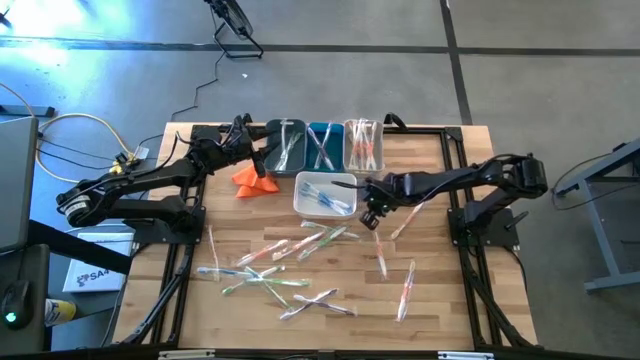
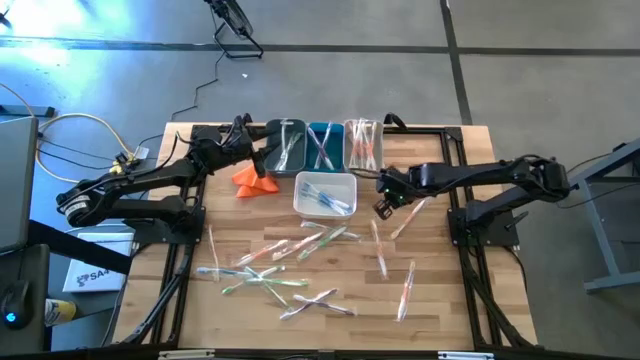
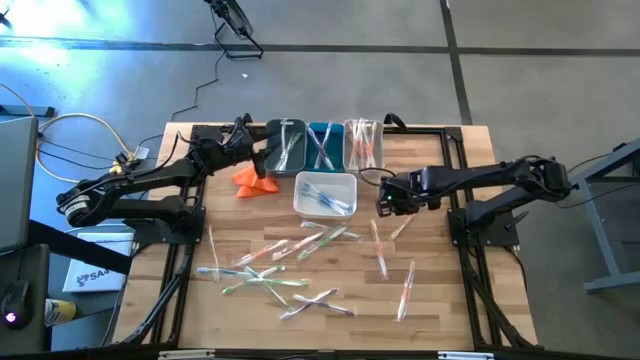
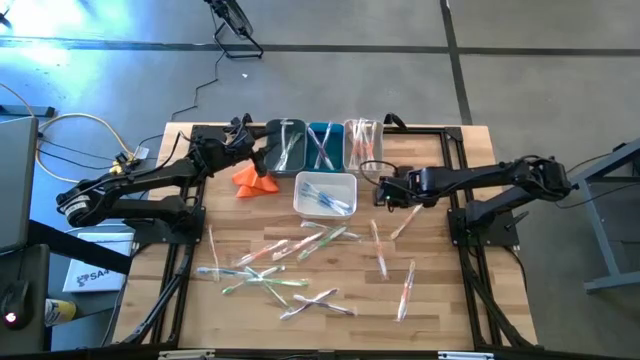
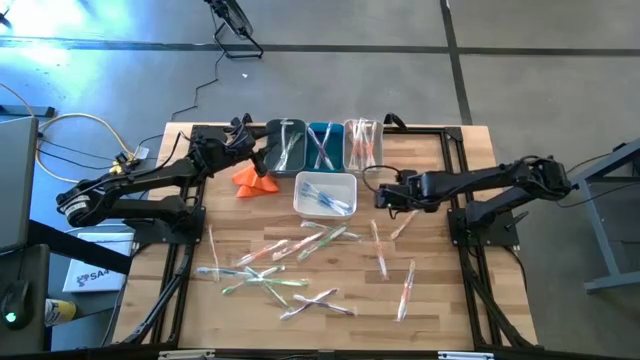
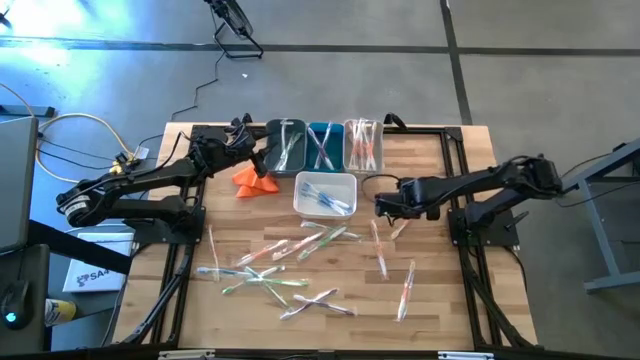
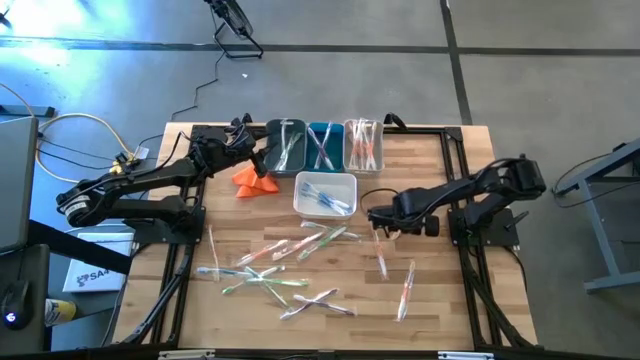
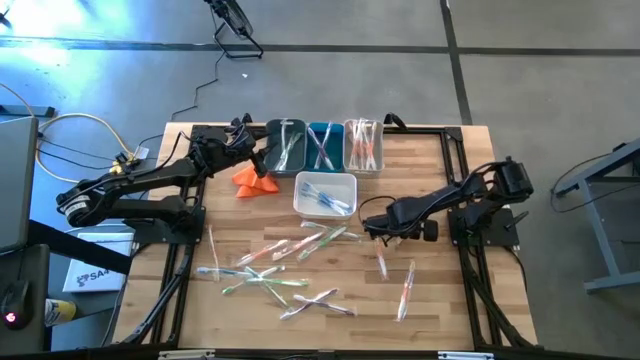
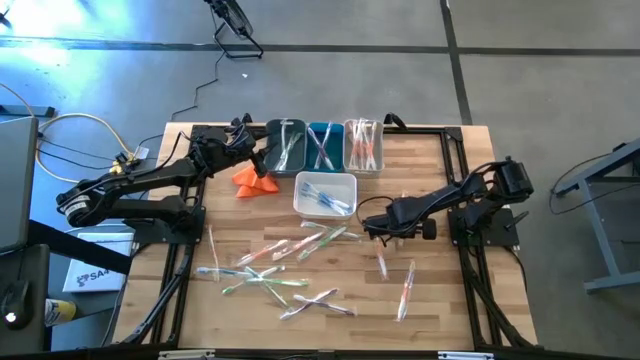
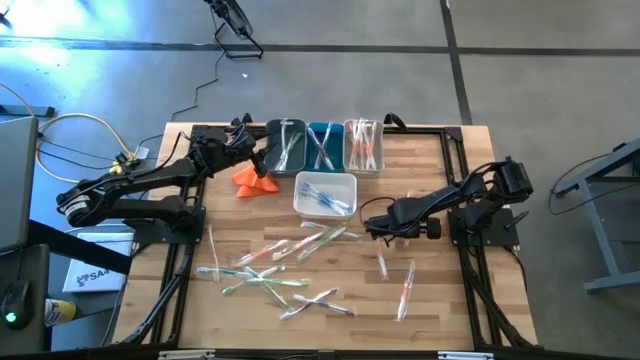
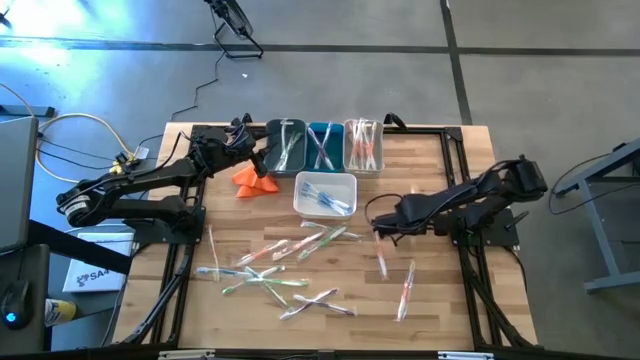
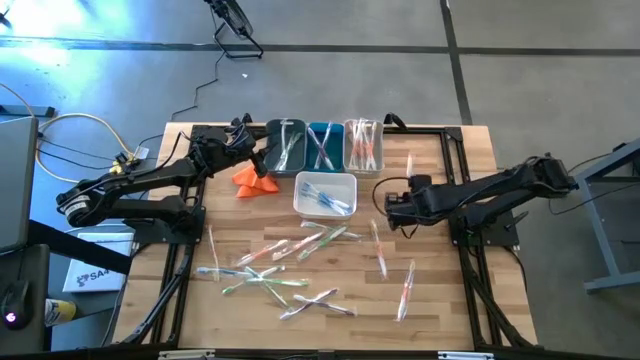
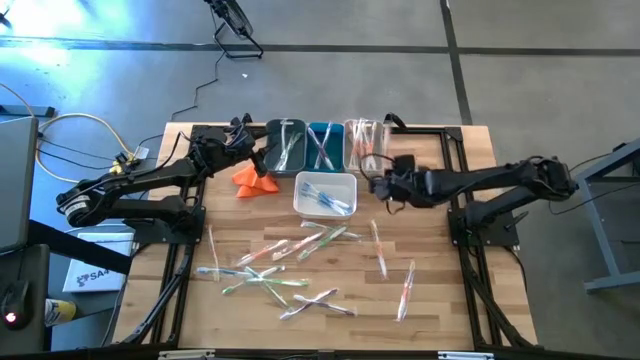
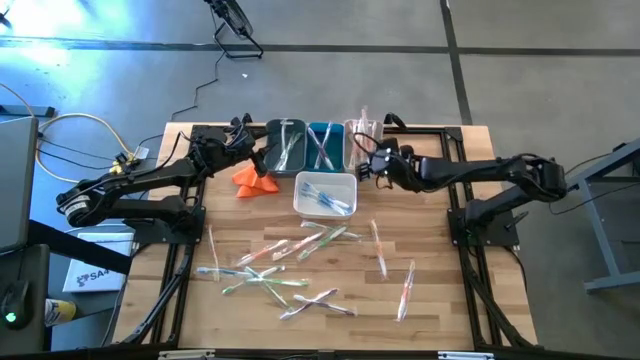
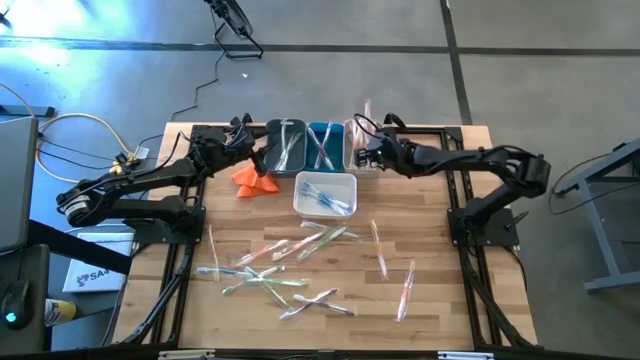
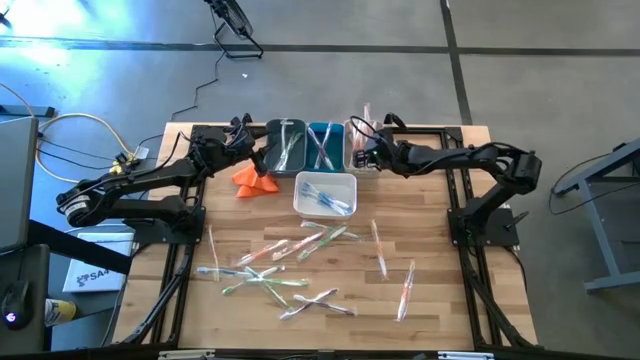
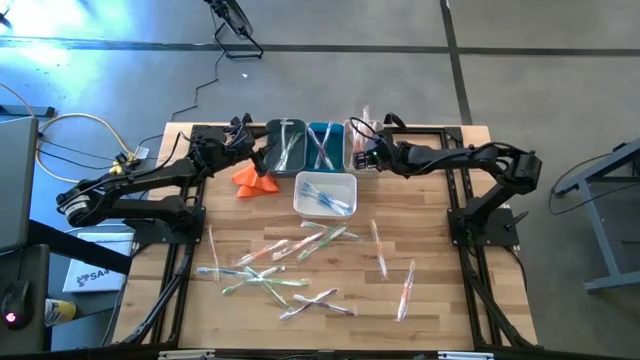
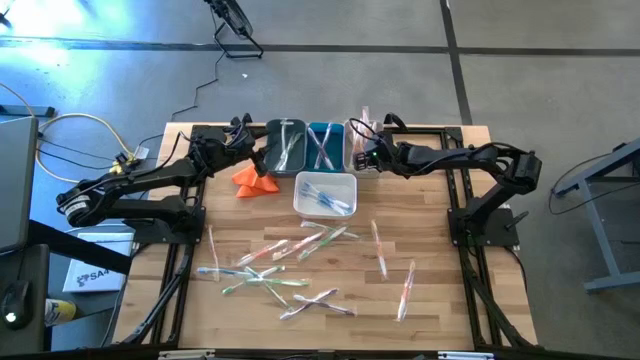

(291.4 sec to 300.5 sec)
Task: Pick & Place Toothbrushes
Put the orange toothbrush into the gray bin

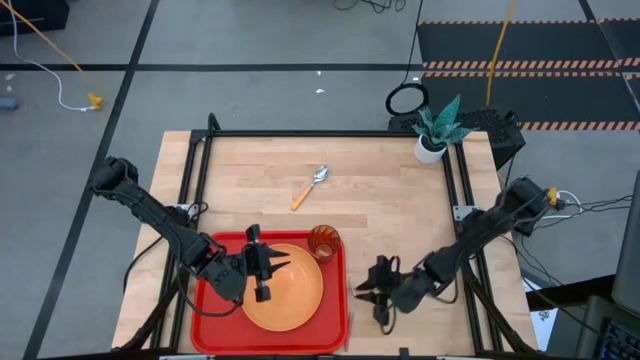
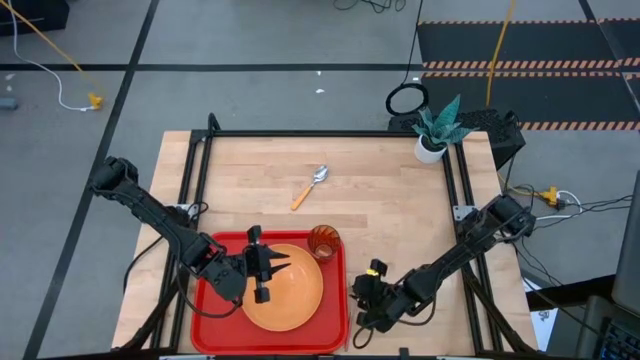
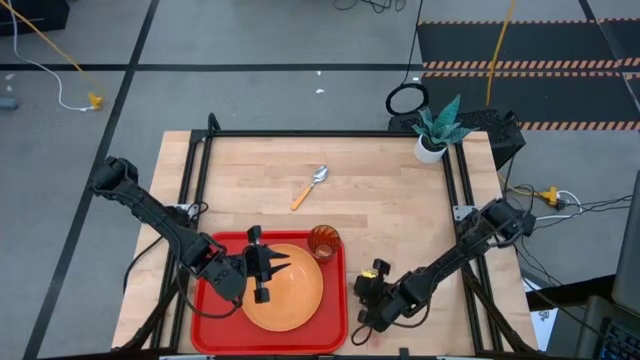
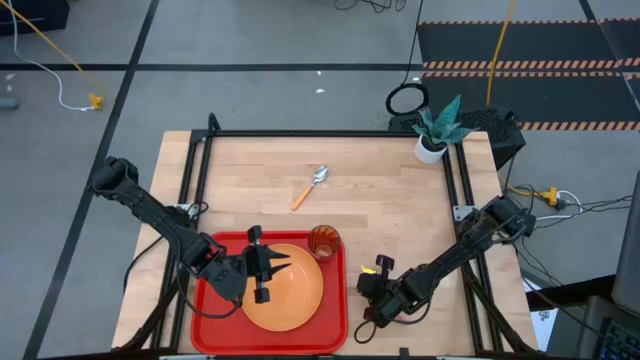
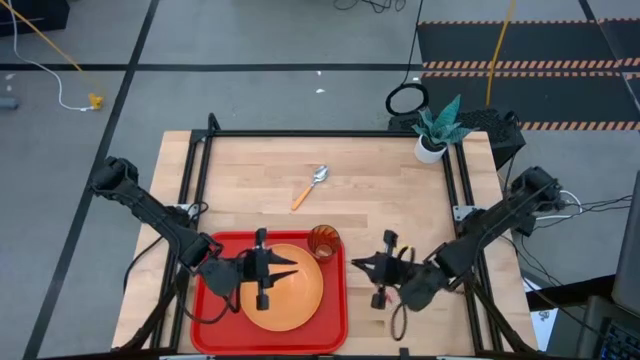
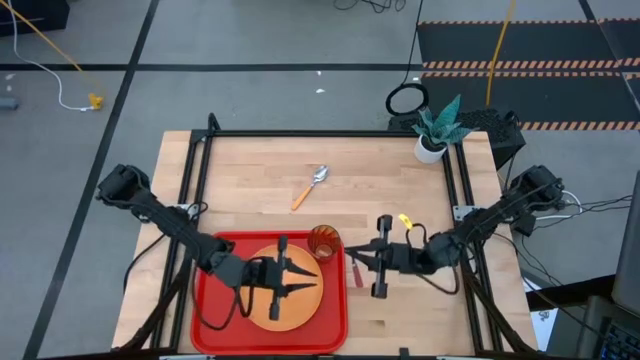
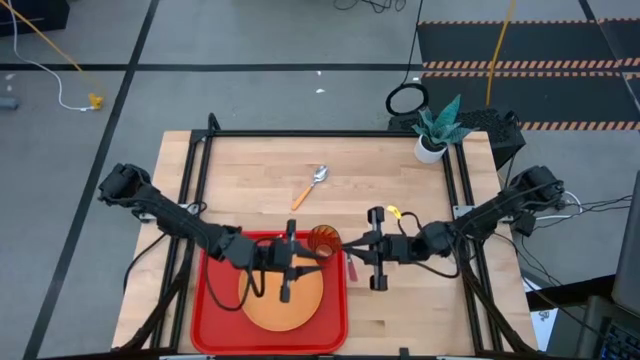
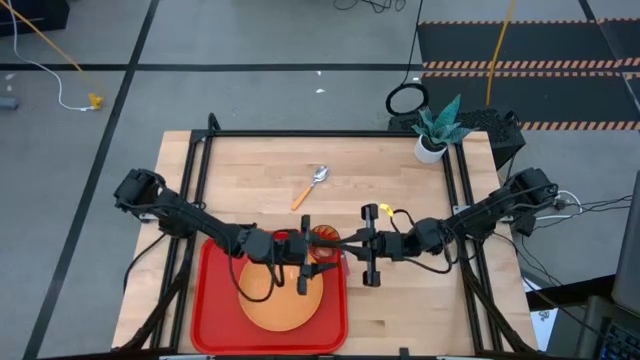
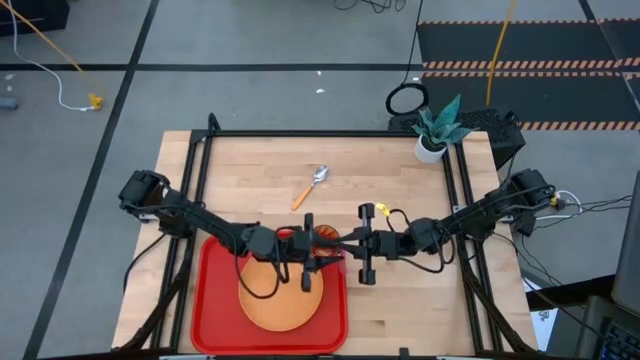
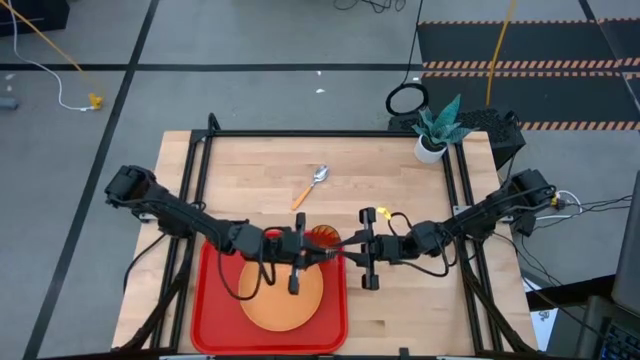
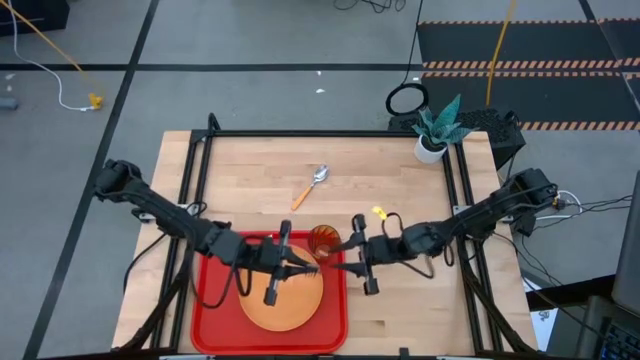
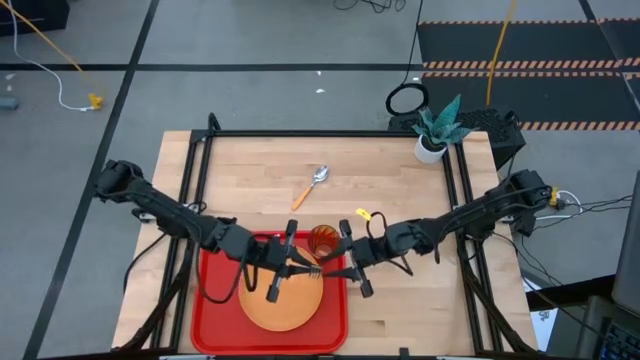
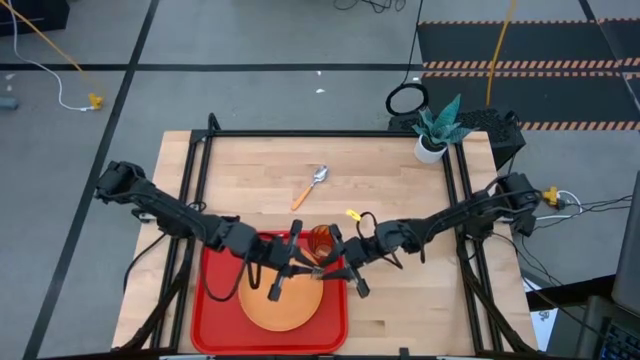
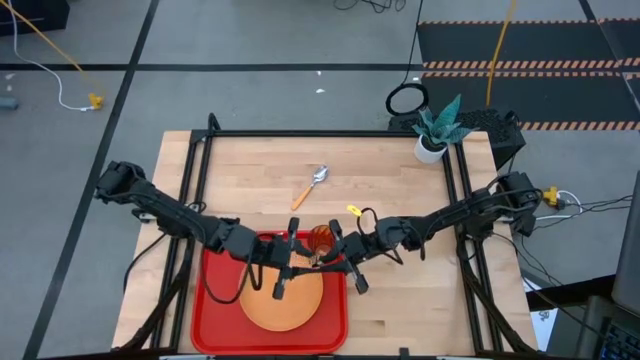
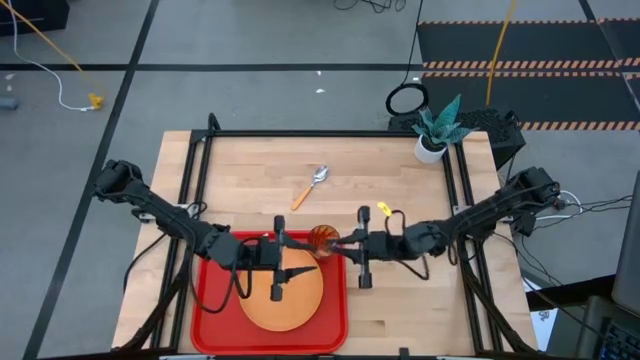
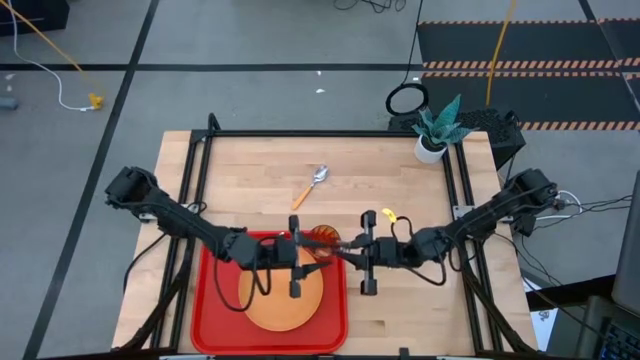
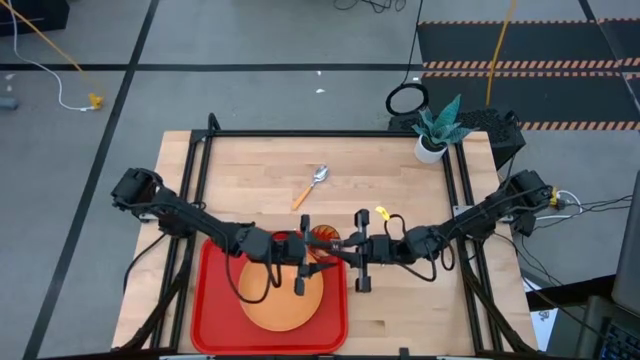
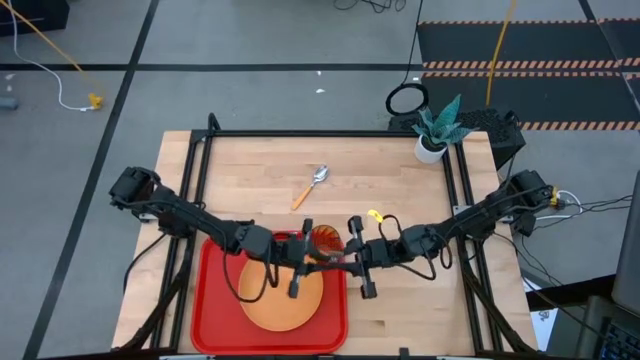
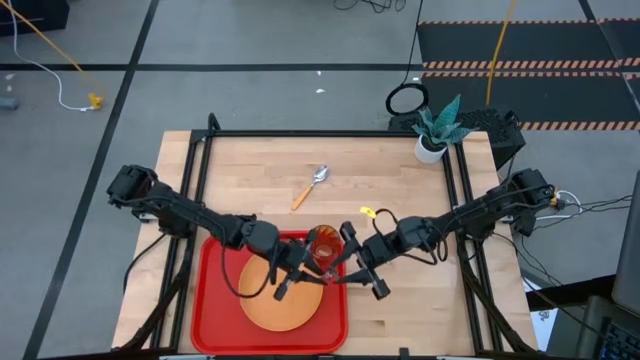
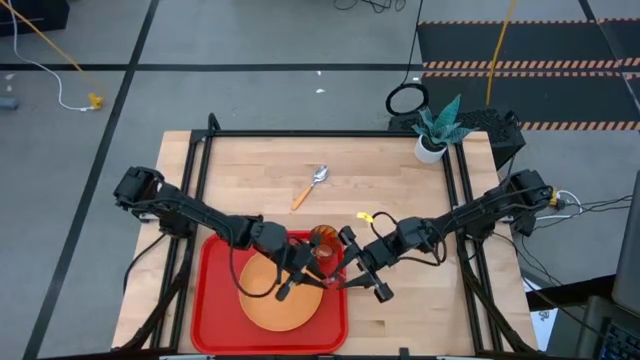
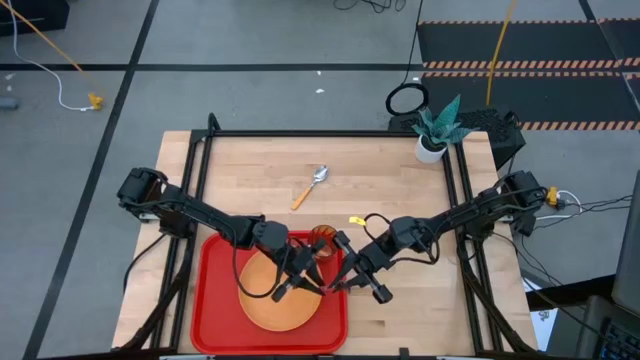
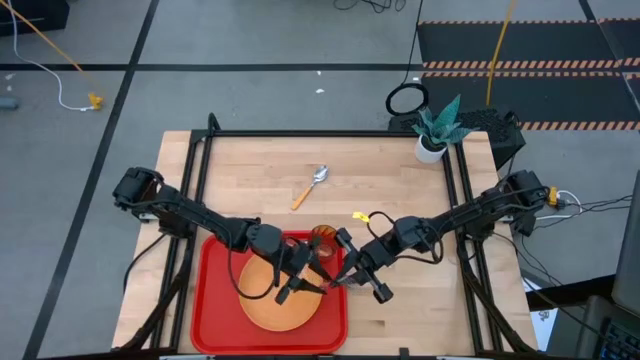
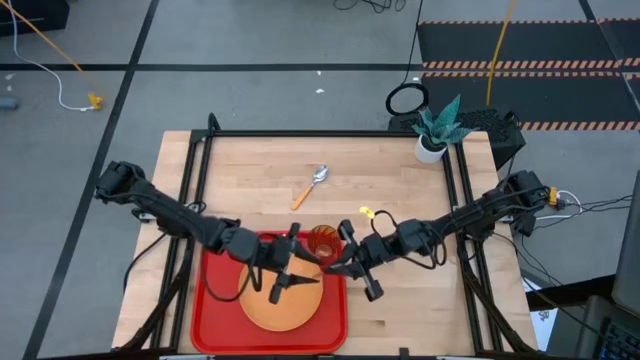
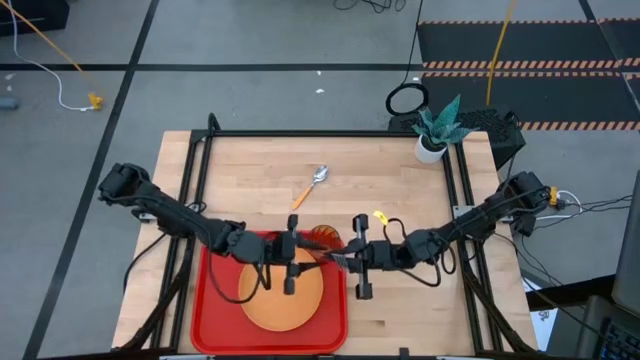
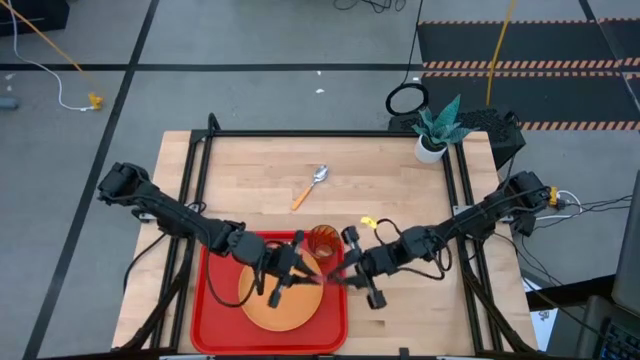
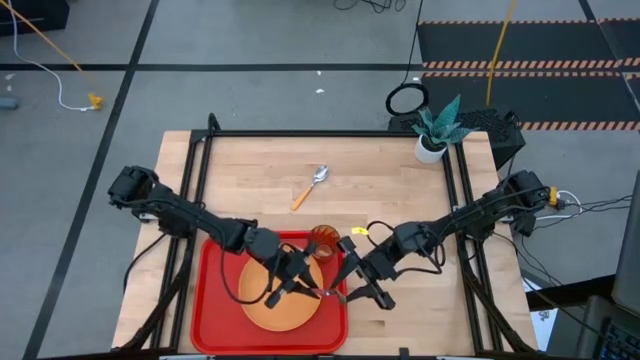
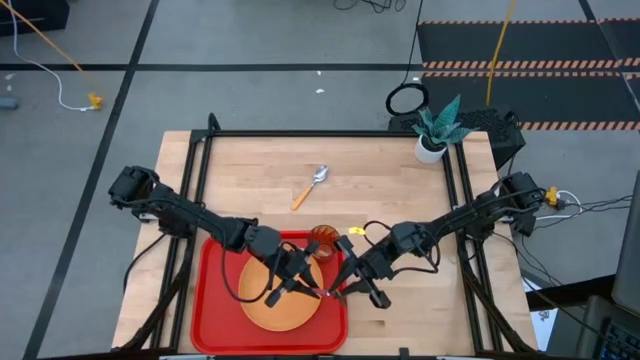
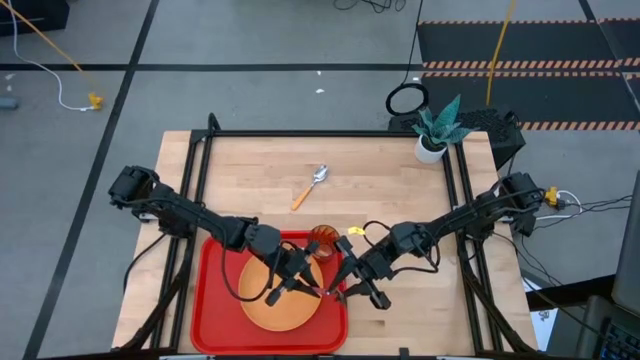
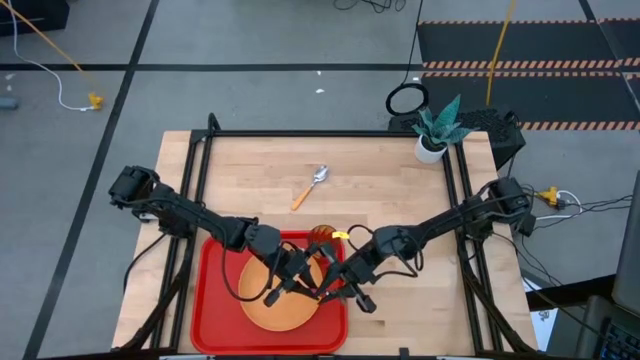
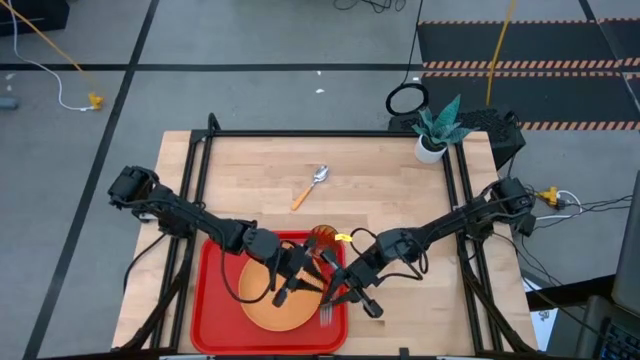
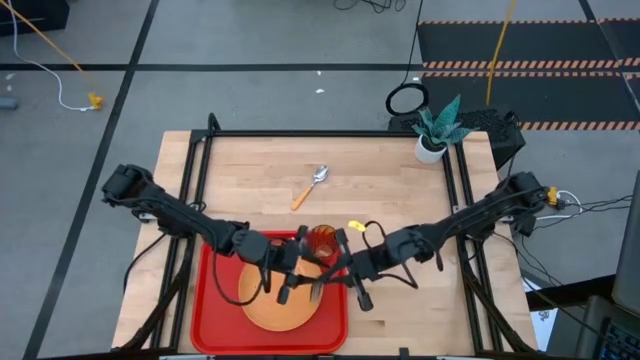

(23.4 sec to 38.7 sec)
Task: Pick and place plate/cup/fork/spoon on tray
Put the pink fork on the red serving tray to the left of the orange plate
